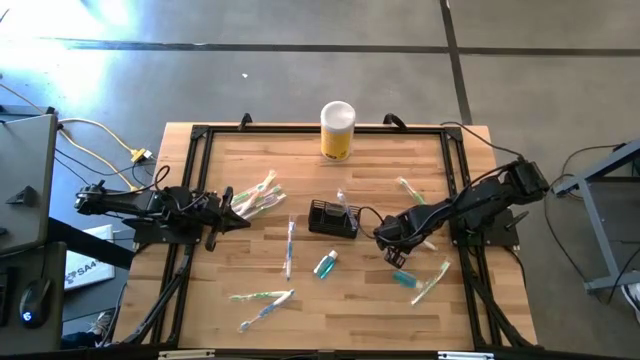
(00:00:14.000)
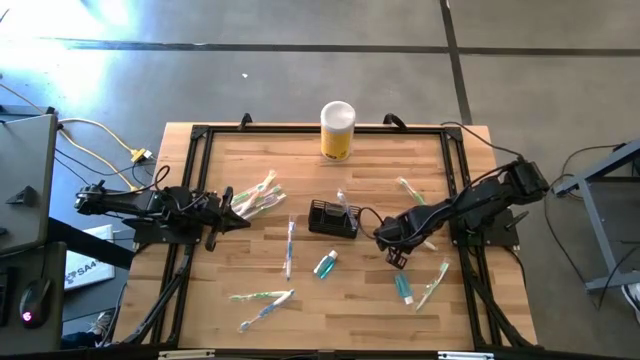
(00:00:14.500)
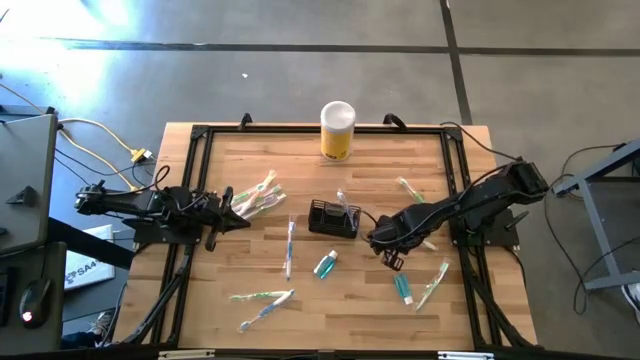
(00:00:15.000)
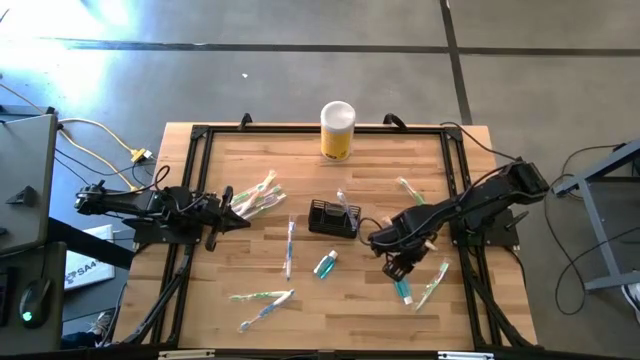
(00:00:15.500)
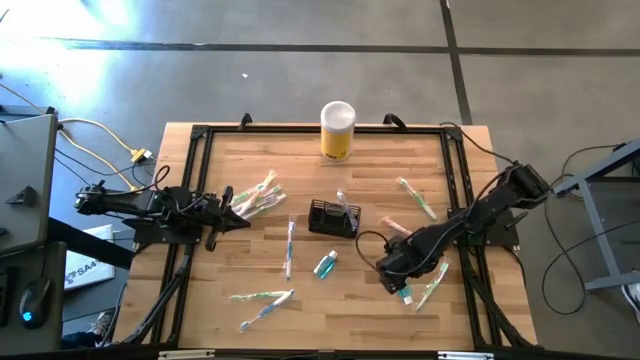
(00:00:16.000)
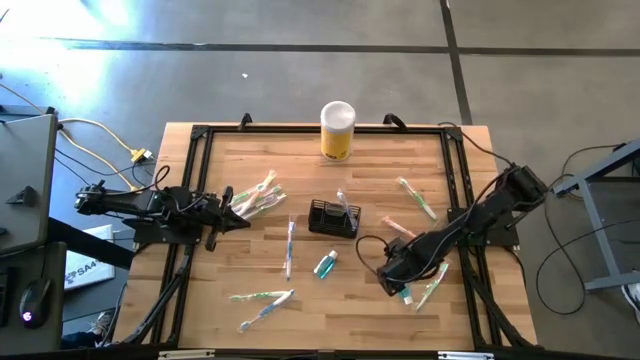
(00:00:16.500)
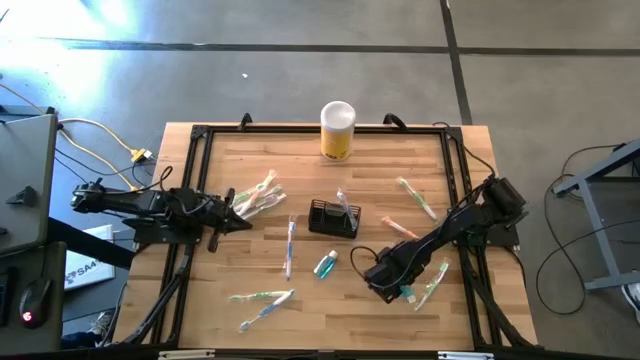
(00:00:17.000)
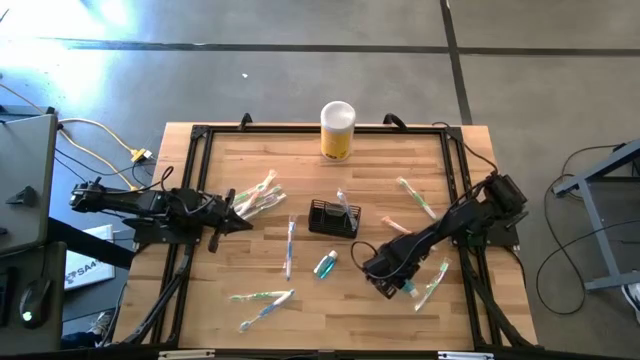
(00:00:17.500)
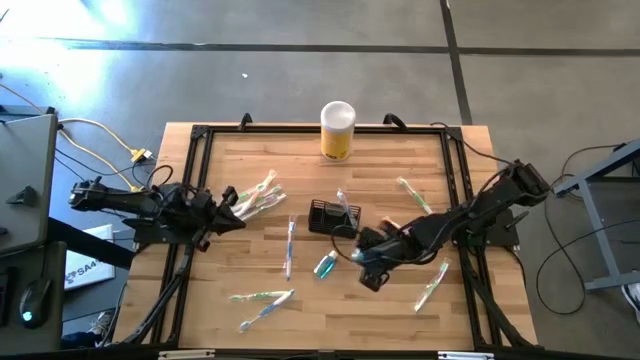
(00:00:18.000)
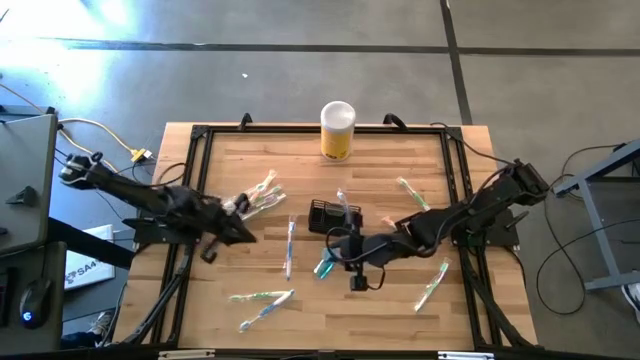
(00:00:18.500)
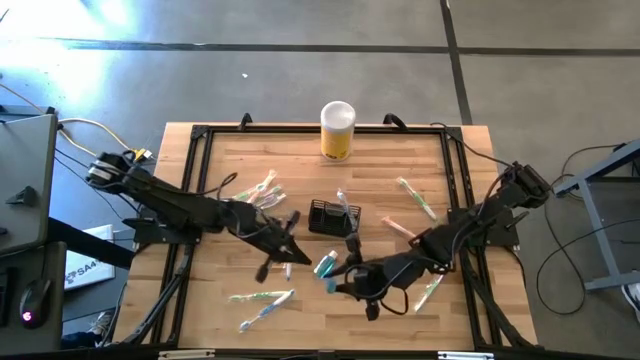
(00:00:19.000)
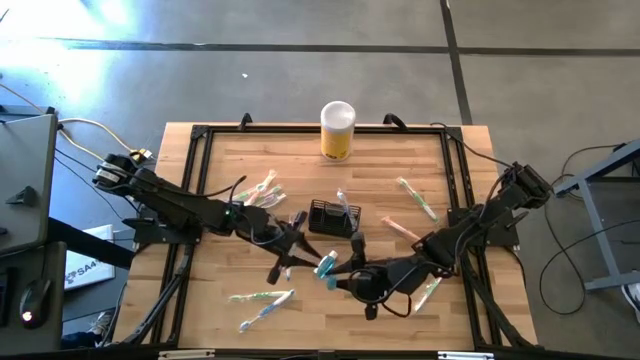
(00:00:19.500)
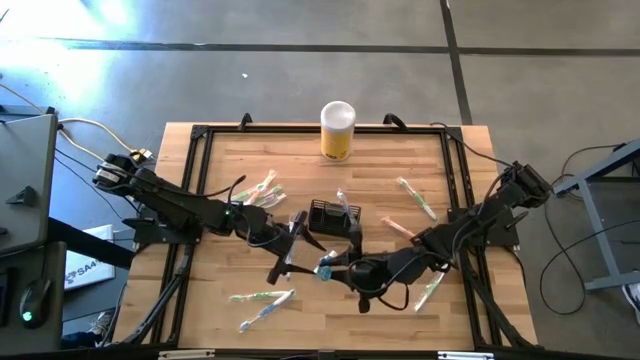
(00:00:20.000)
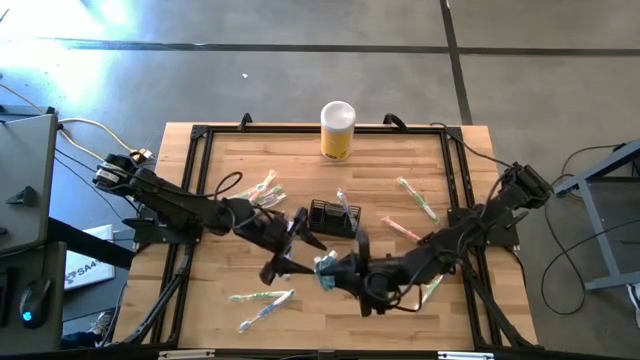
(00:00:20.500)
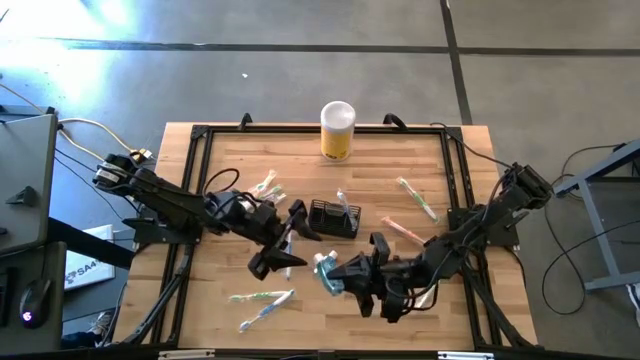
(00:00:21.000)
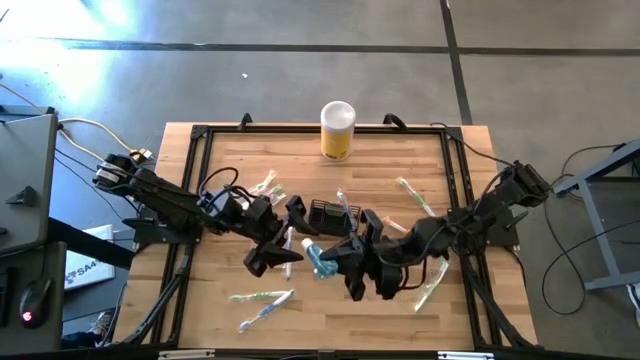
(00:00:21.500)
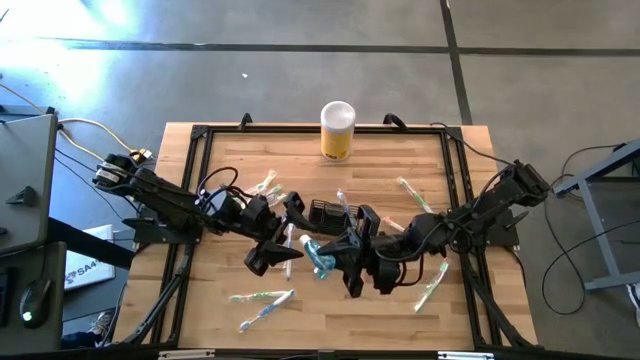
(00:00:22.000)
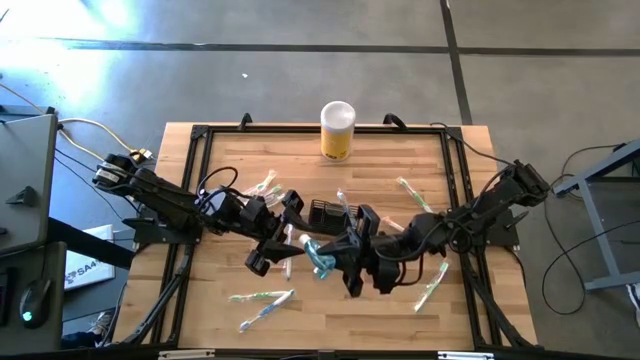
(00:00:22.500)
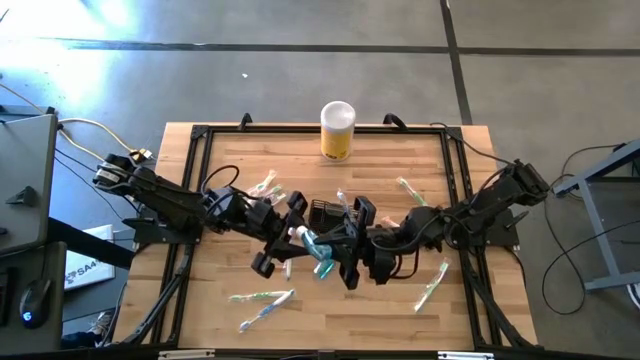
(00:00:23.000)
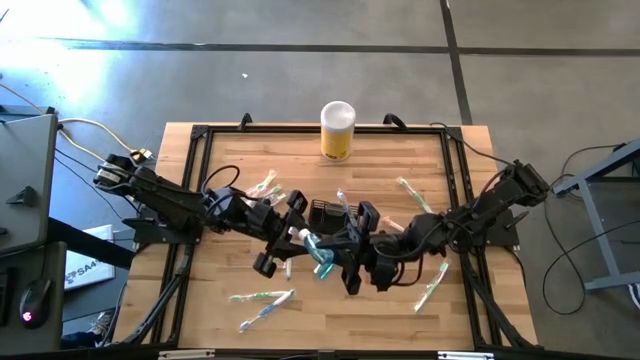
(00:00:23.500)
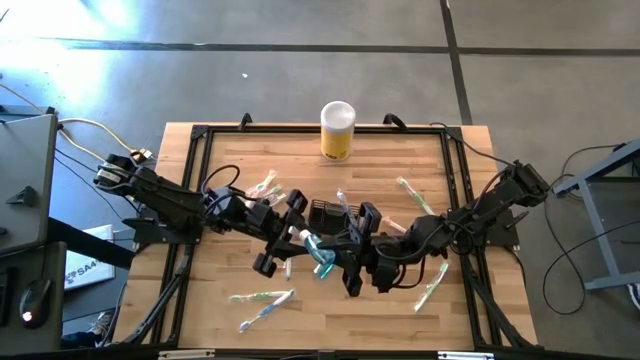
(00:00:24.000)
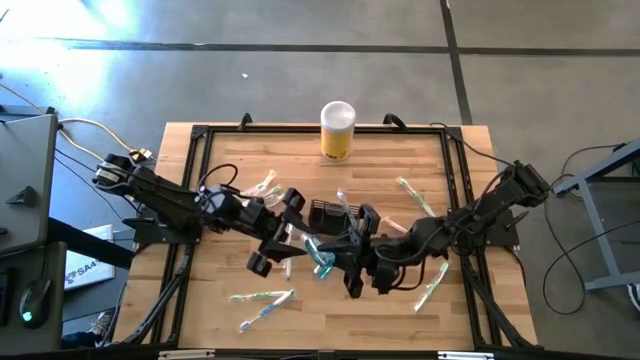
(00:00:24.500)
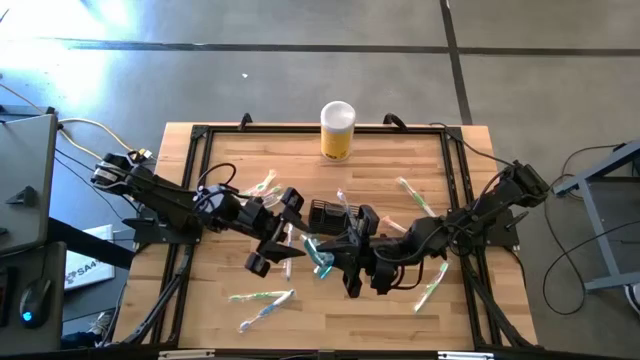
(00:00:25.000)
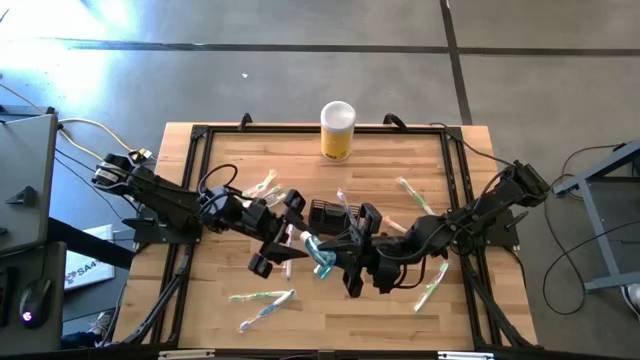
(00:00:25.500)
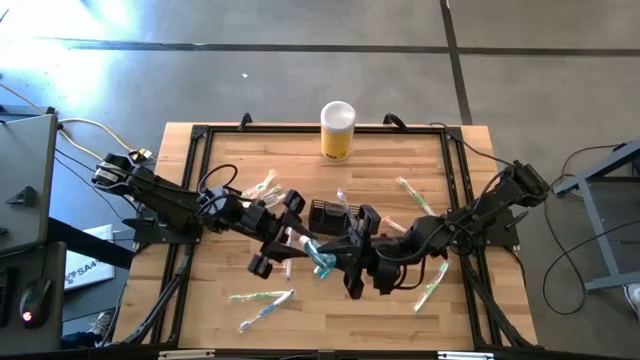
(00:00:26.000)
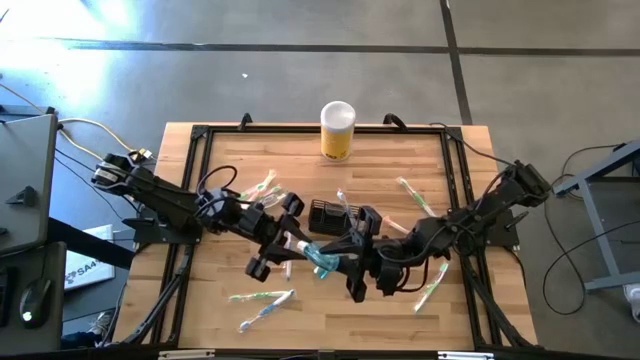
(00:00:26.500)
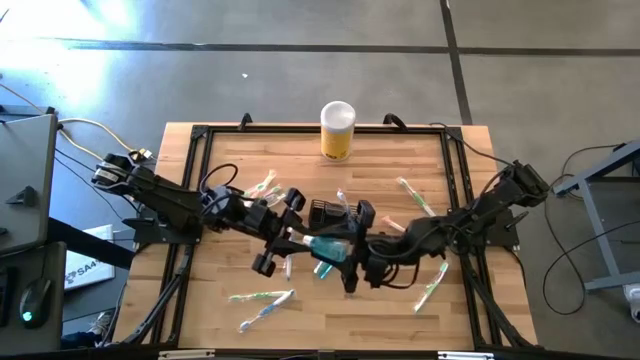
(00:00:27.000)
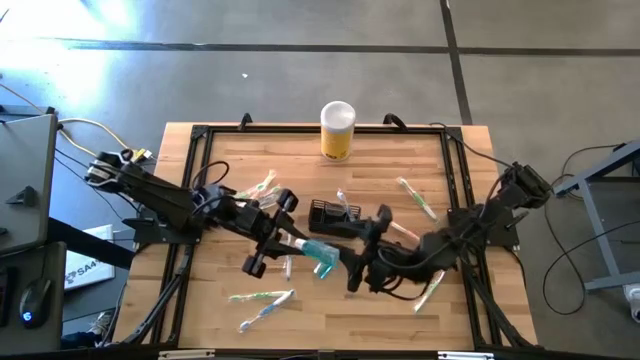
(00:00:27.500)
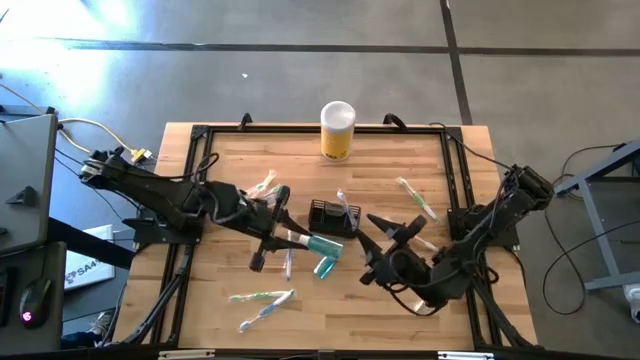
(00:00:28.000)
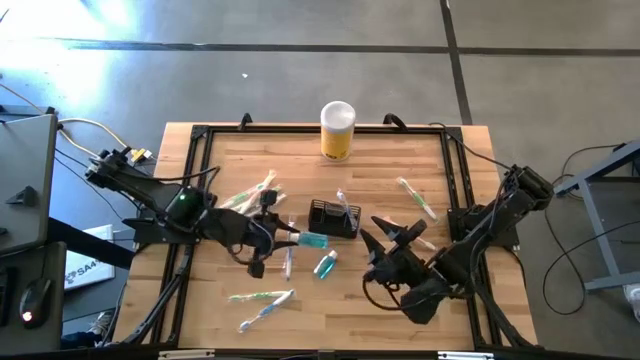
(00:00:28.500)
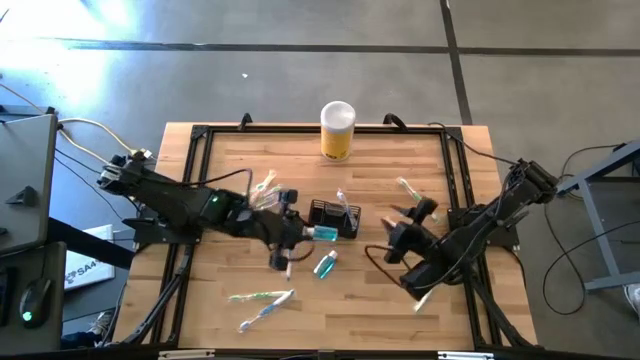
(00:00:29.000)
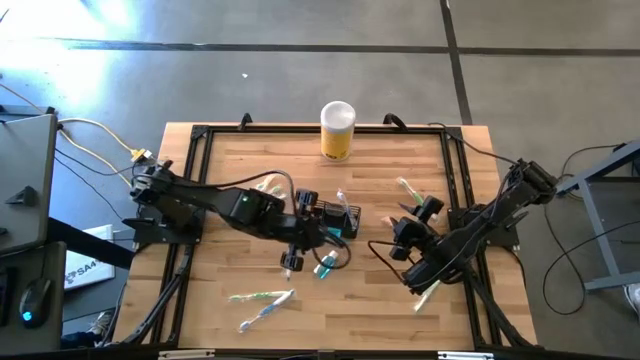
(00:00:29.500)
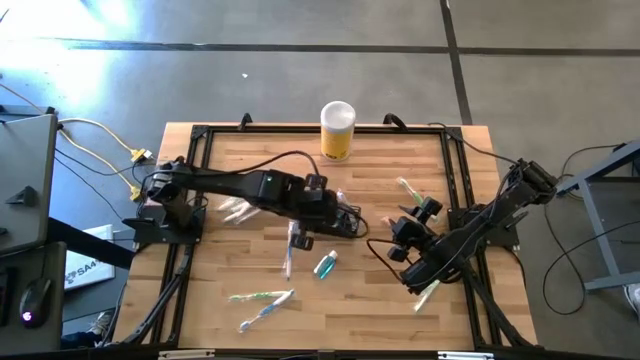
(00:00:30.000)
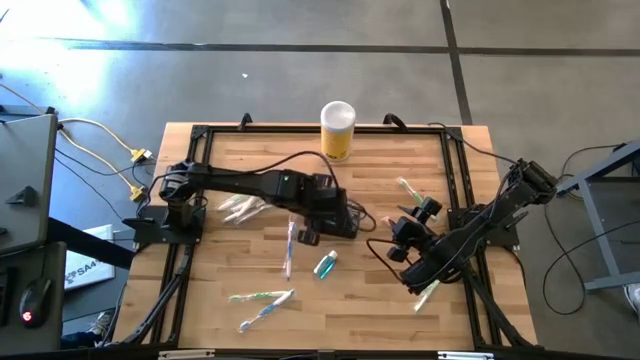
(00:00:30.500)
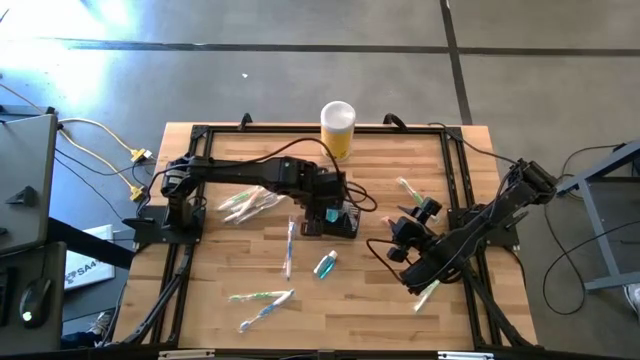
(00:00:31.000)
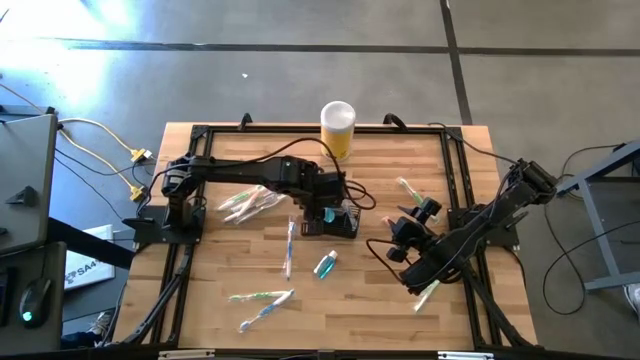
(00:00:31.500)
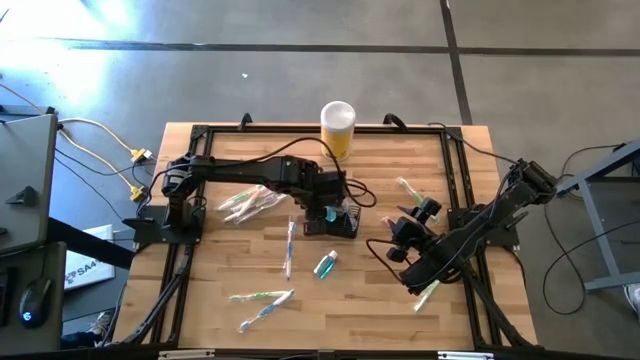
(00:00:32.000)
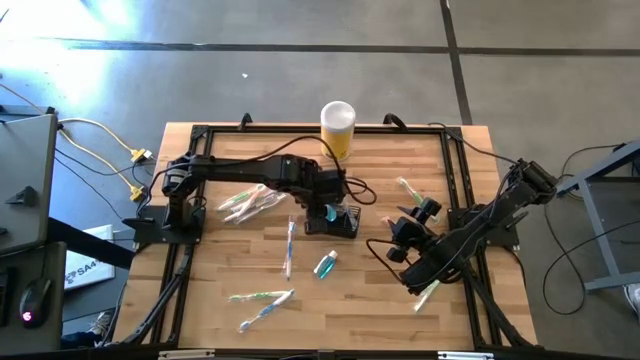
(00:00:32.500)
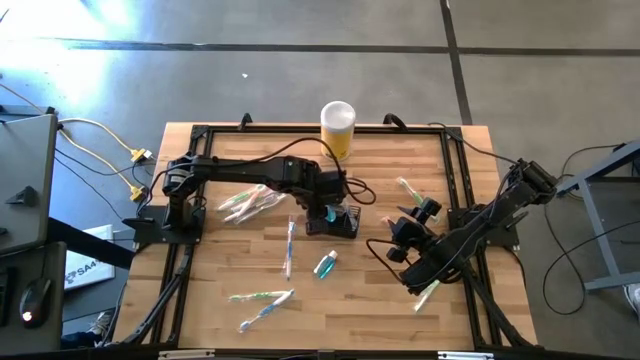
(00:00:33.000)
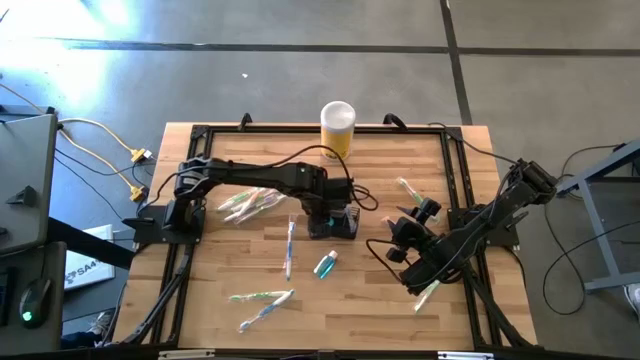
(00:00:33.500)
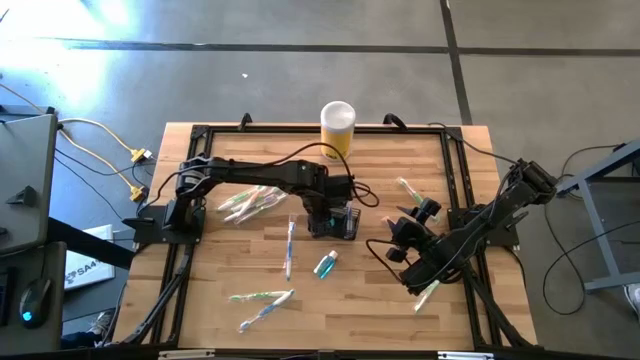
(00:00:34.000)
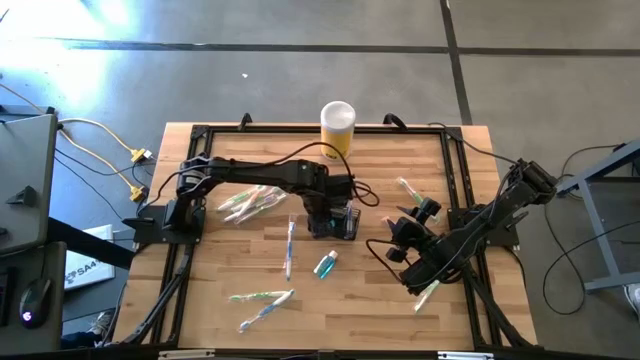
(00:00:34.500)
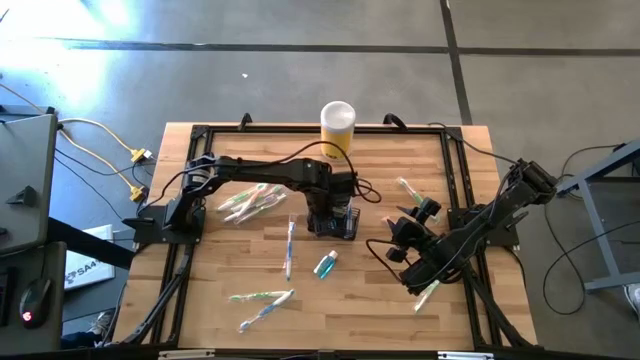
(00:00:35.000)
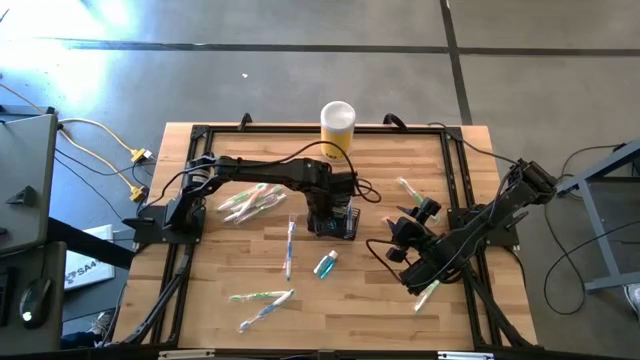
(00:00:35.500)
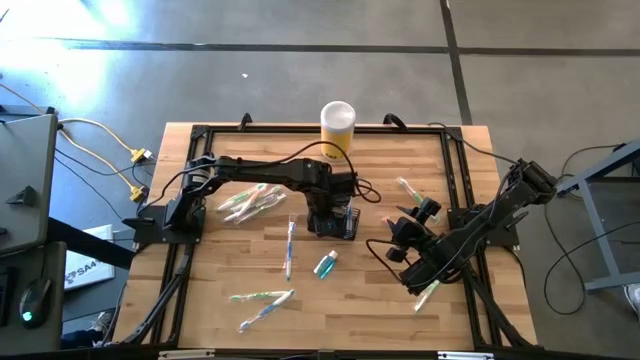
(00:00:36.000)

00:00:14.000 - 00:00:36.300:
Task: Pick & Place toothbrushing station
Put the right blue mouthwash into the wire organizer
